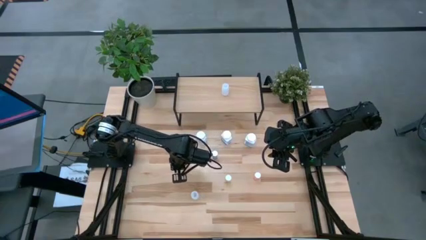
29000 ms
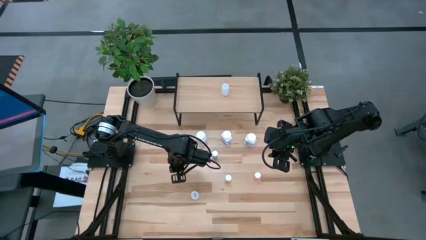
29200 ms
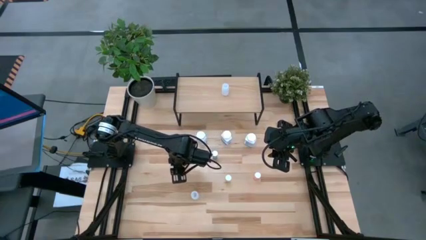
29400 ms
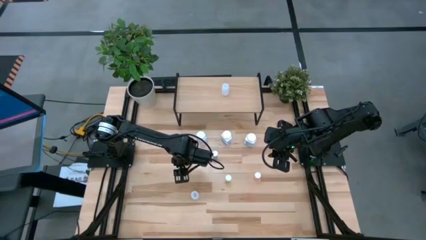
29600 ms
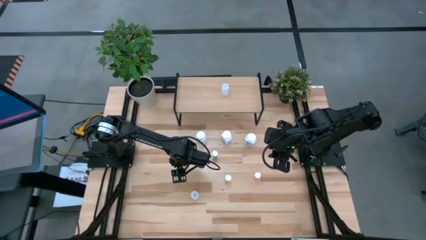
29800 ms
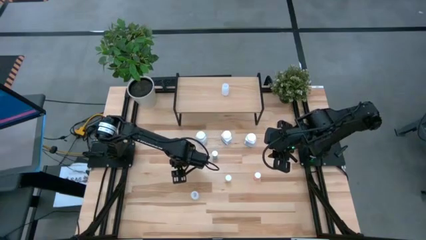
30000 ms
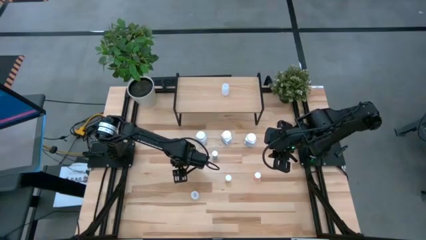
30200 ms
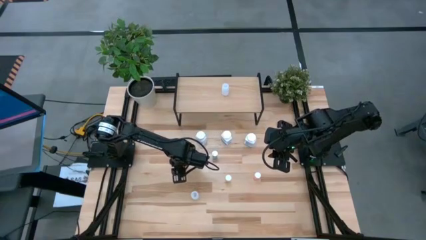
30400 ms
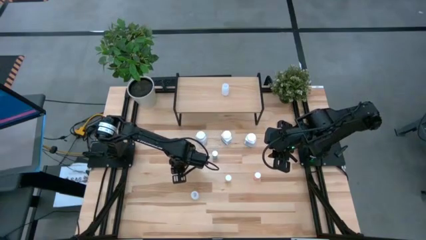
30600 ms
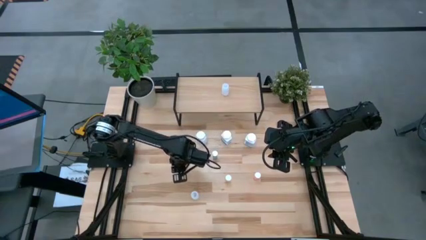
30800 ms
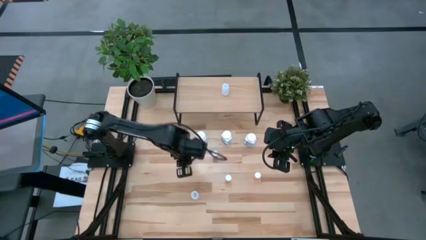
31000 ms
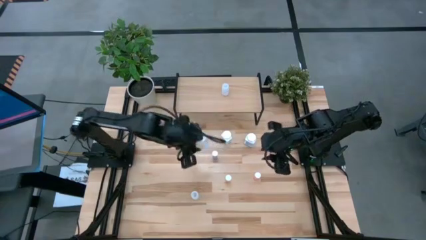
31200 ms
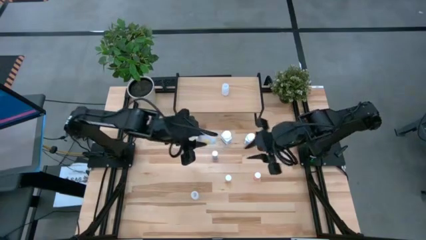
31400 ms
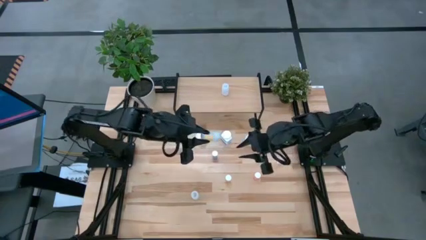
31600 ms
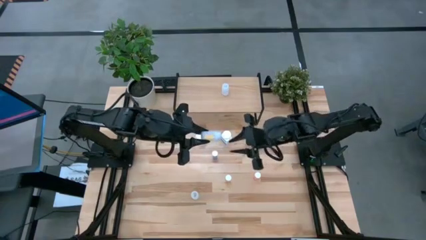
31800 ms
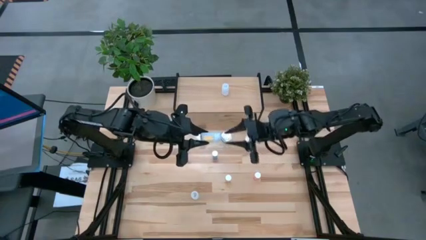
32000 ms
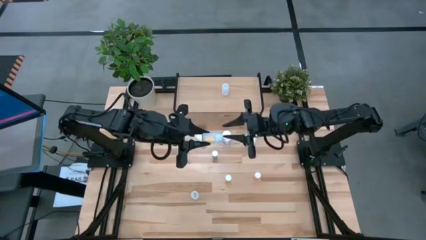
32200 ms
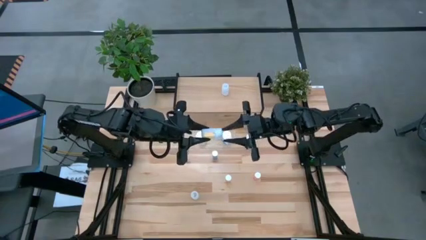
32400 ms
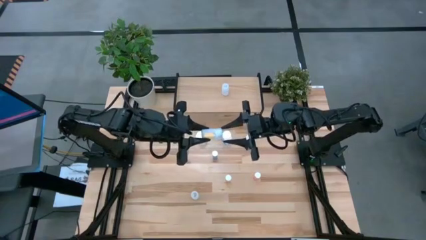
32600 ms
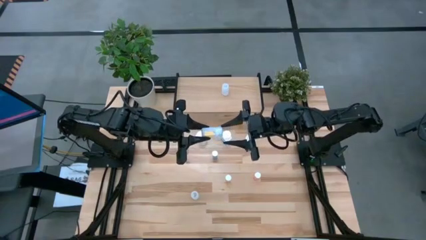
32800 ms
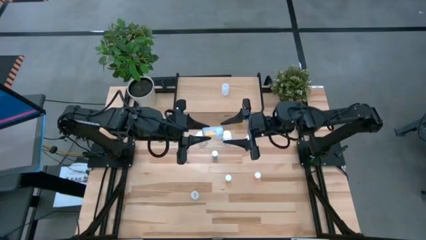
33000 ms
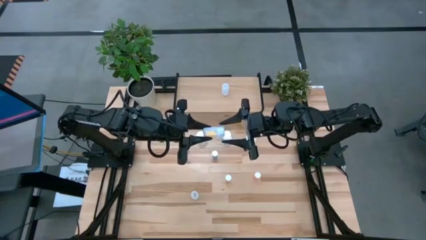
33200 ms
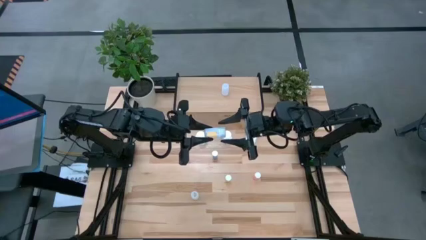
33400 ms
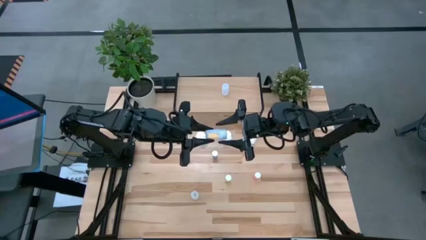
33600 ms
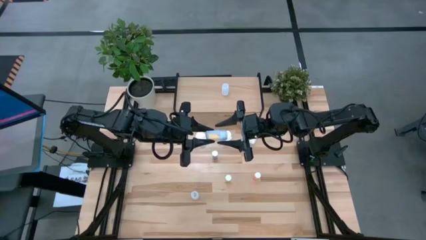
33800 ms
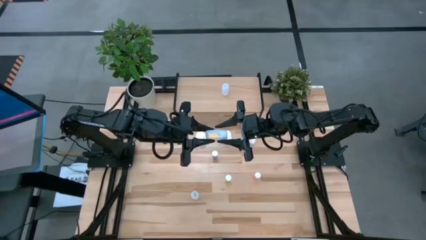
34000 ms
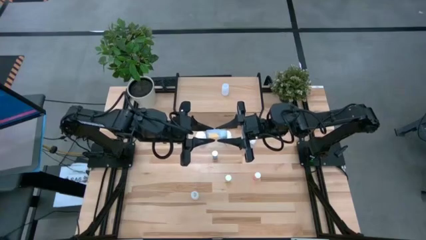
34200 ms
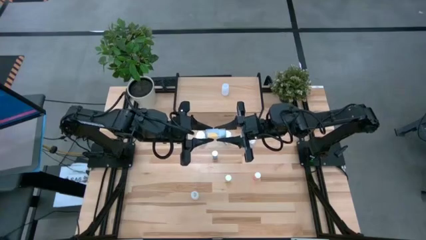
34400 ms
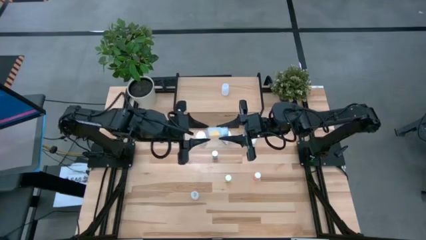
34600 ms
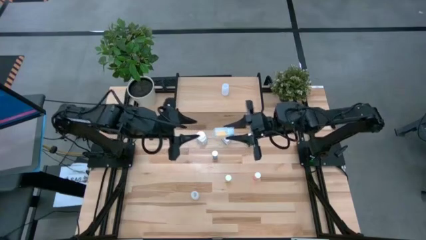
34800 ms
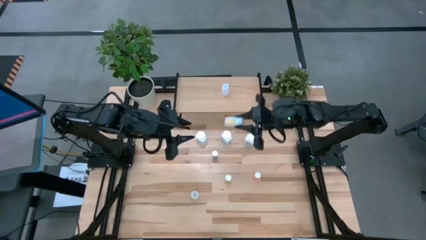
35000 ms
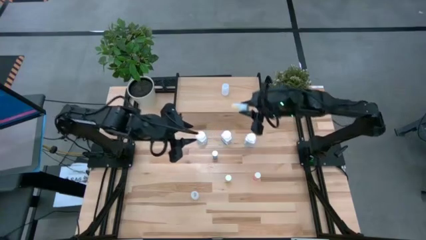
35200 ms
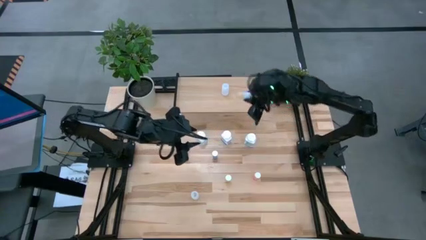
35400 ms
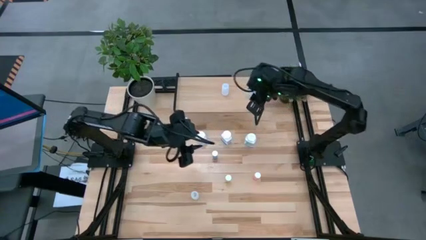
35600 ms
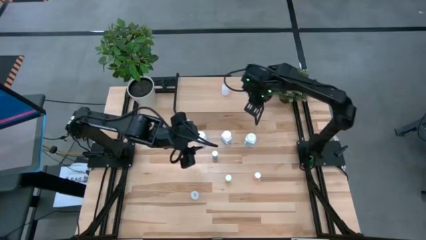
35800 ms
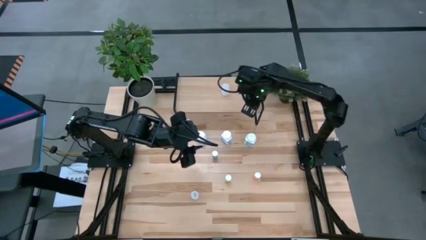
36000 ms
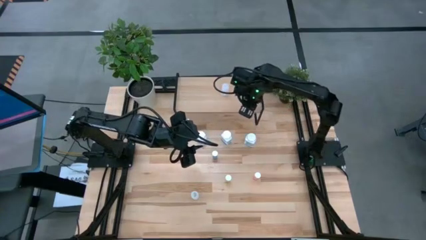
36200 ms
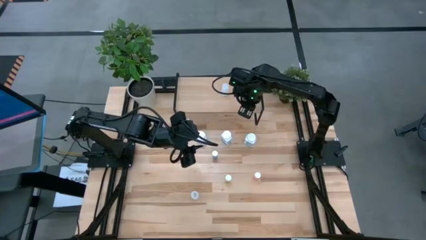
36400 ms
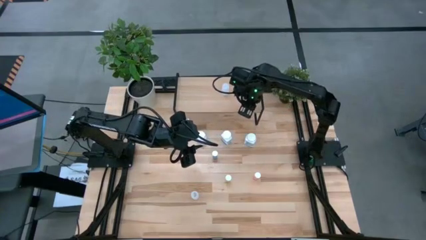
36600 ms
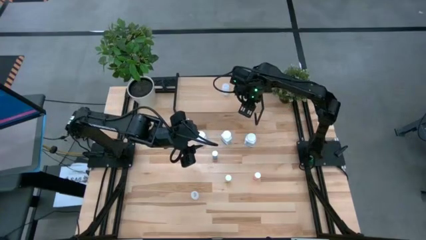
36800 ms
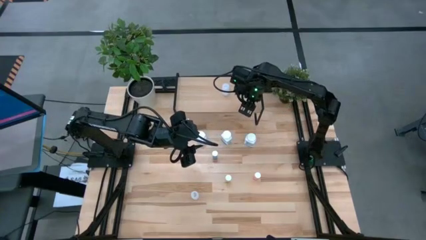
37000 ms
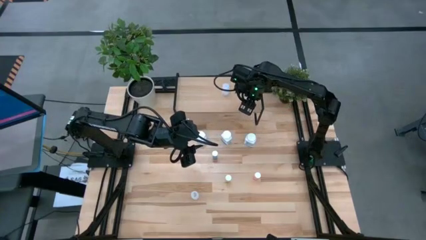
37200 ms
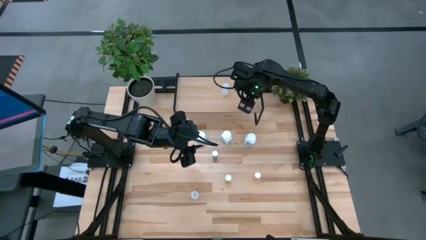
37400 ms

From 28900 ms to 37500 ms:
Task: Pick and place medicine bottles onto shelf by color
Put the top white pill bottle on the shelf

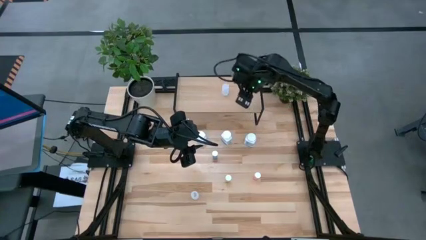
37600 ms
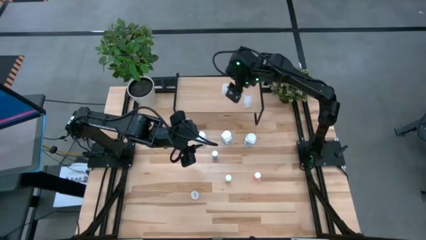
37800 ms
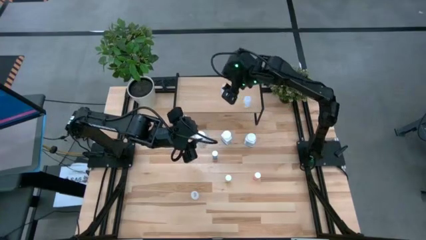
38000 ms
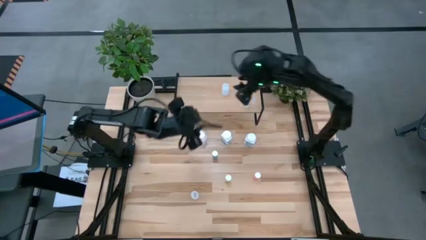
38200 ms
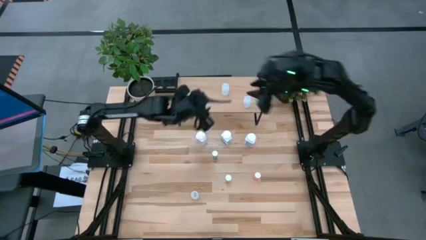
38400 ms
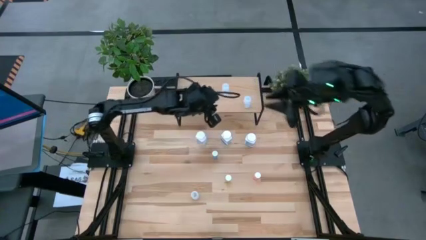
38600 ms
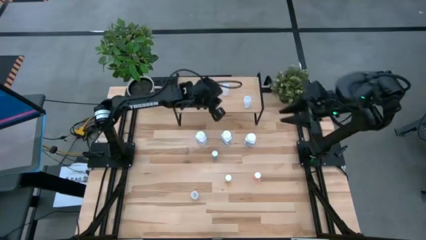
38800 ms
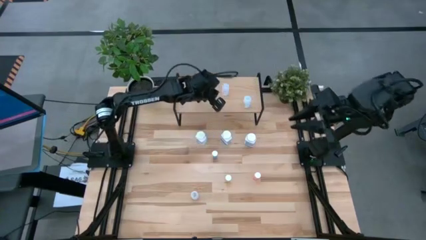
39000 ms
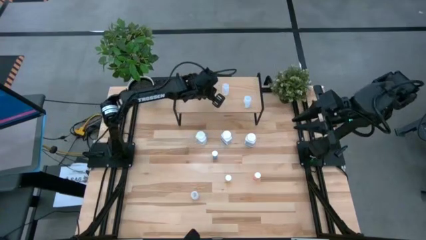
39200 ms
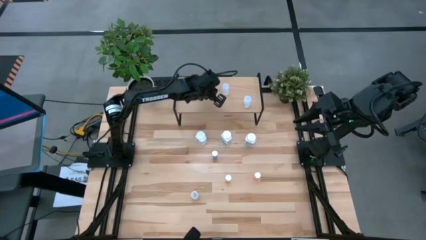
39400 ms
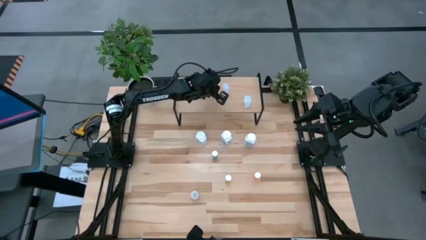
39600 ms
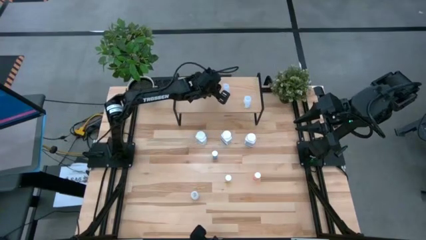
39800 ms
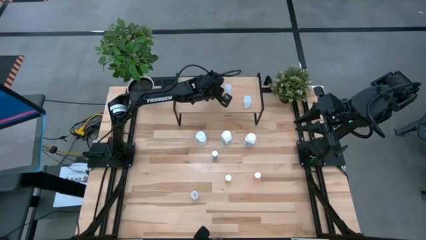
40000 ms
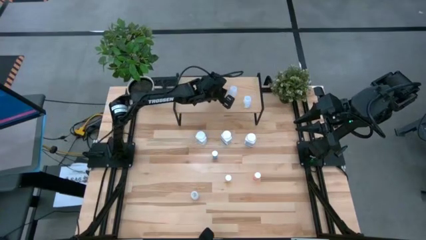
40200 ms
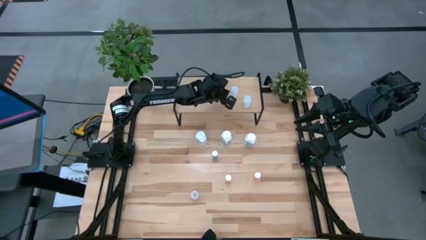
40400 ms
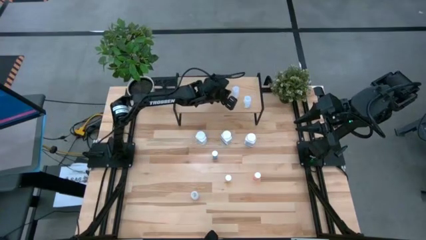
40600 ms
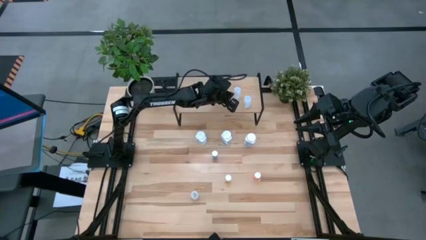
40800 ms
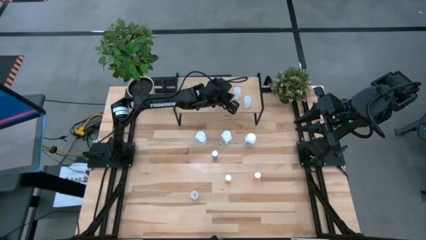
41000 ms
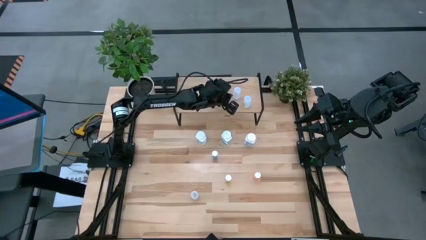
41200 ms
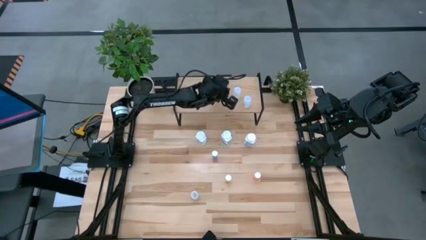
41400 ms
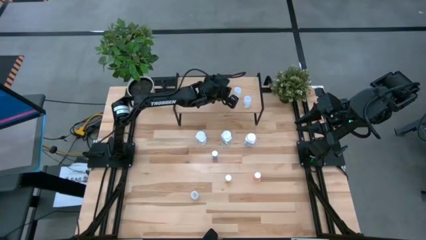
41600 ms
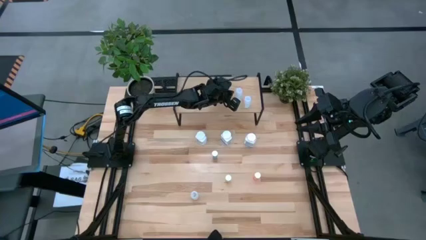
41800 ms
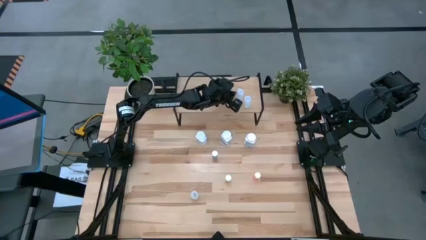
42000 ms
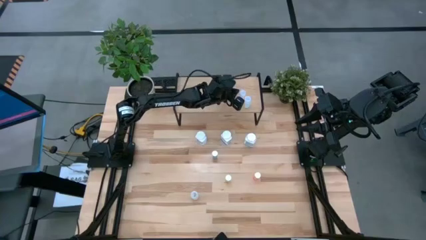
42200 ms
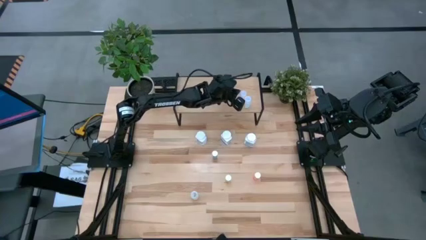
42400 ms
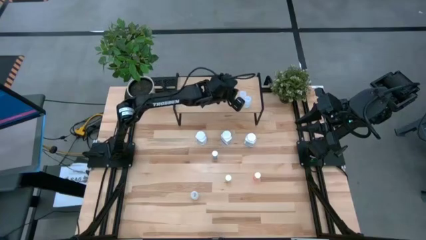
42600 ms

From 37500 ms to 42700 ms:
Adjust the left white pill bottle on the shelf

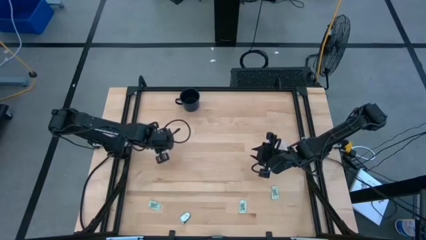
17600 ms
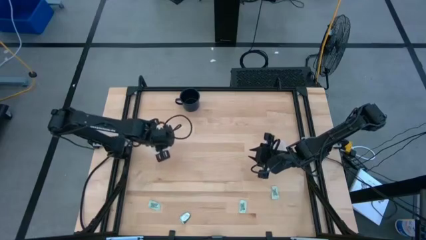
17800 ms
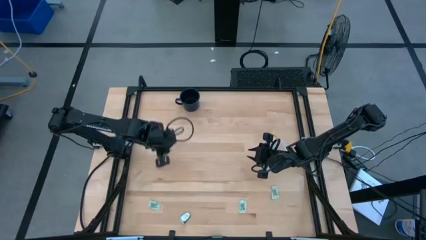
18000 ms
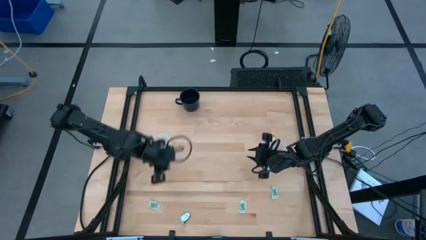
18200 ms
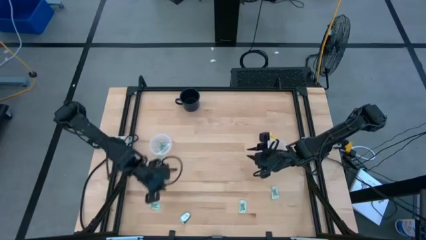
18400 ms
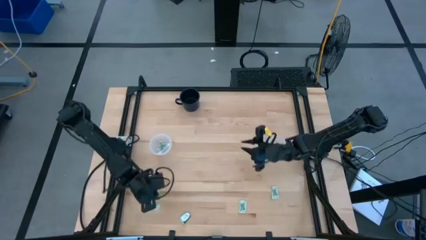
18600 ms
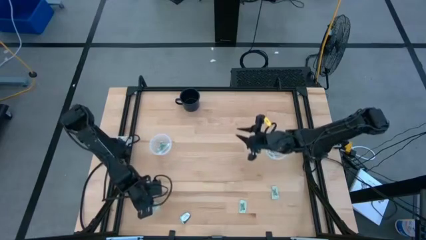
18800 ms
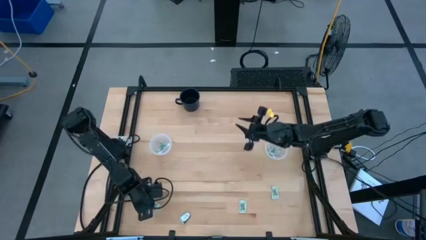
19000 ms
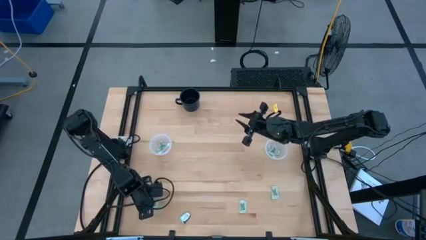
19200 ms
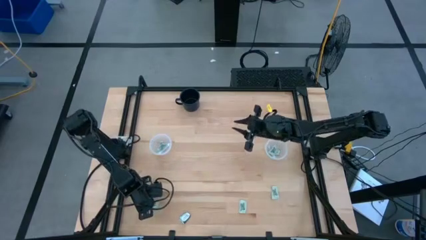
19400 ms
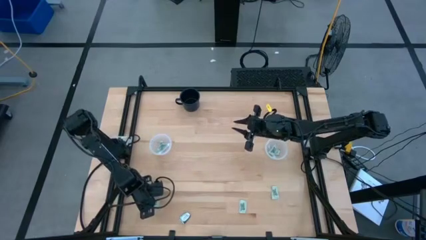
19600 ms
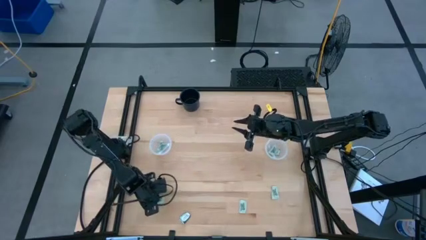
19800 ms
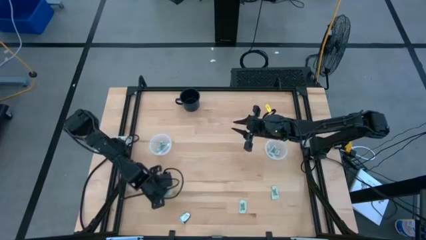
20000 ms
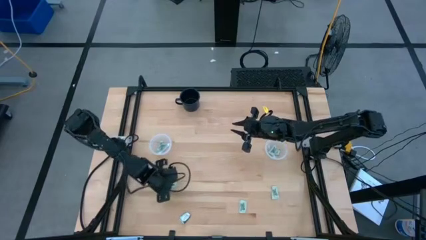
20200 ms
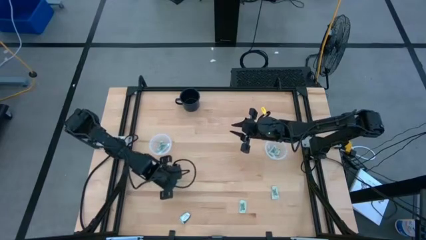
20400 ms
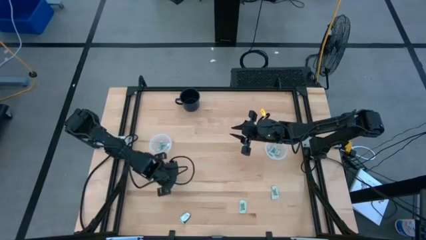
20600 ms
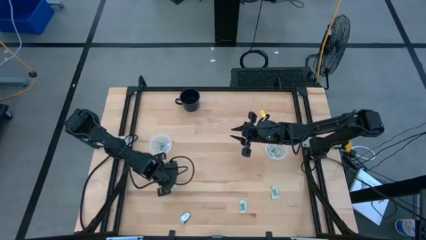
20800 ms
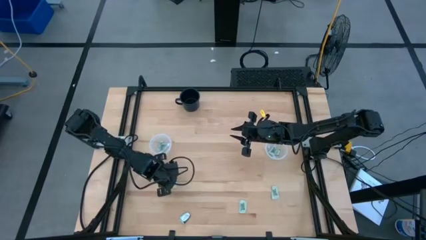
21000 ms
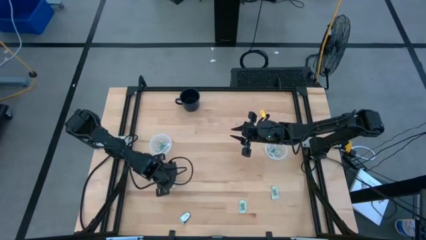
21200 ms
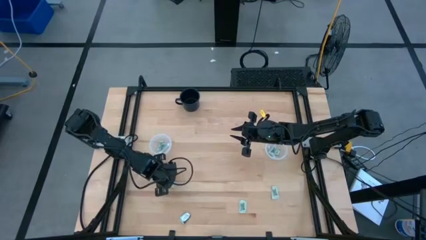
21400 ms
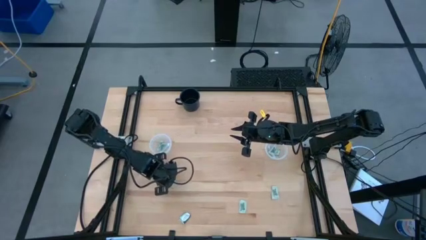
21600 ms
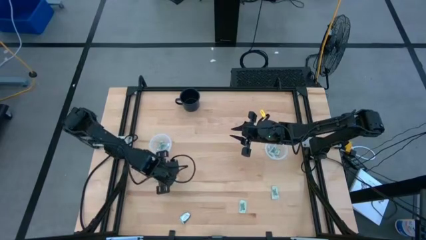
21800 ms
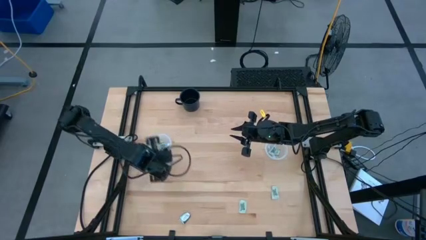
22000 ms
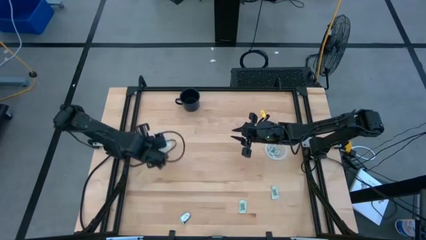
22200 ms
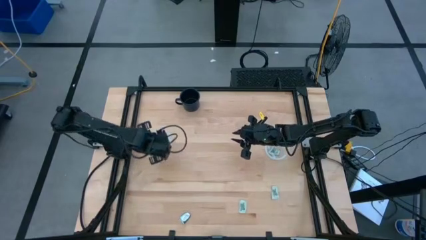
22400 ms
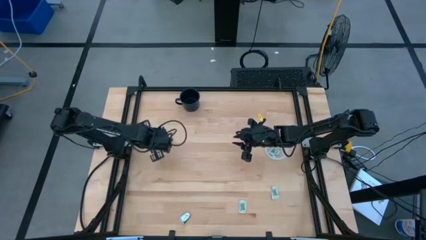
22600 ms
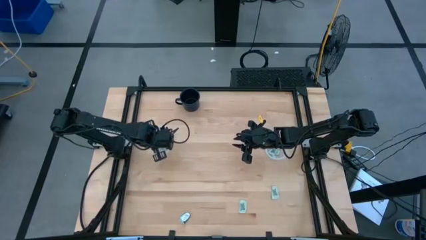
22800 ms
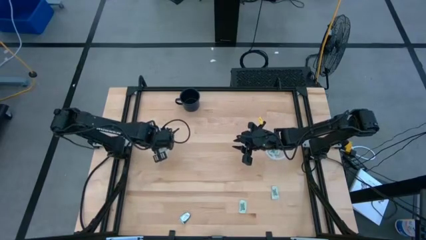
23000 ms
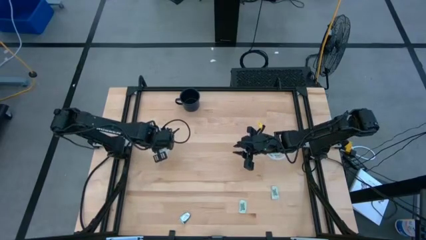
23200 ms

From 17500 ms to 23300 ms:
Task: Pick and place Stevia / Truvia into bins
Put the stevia packet into the left container
